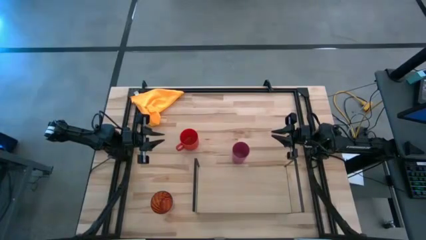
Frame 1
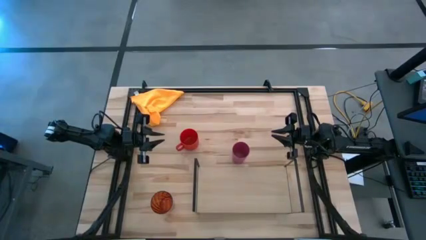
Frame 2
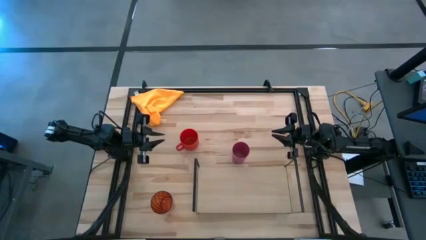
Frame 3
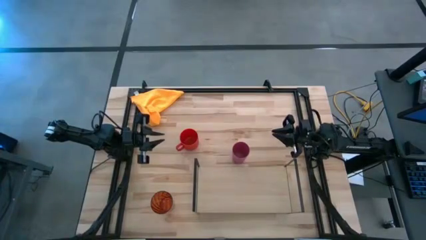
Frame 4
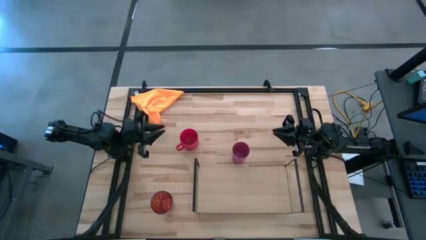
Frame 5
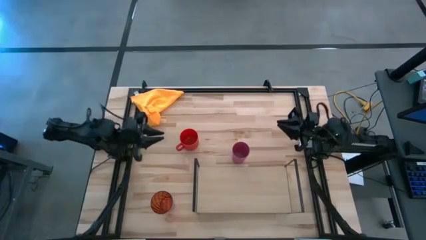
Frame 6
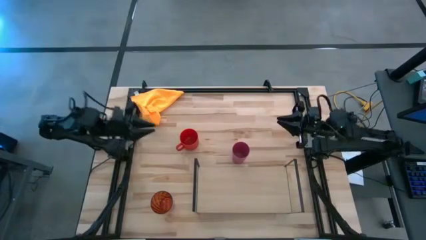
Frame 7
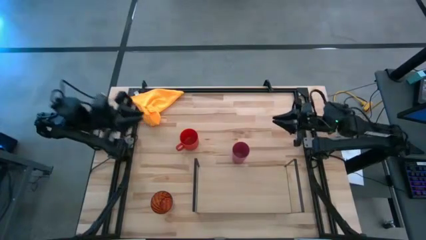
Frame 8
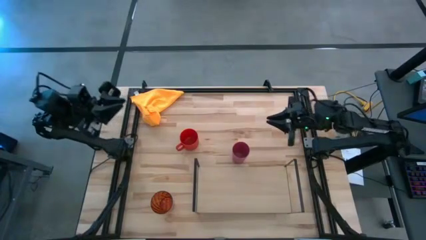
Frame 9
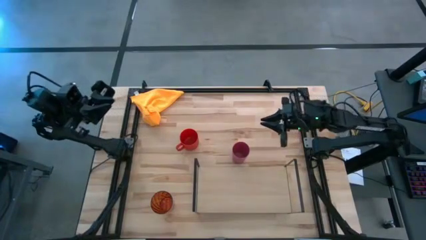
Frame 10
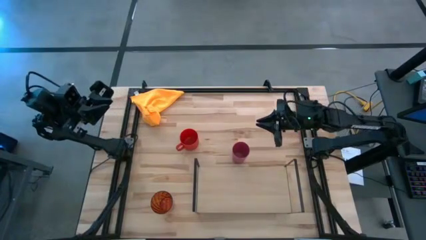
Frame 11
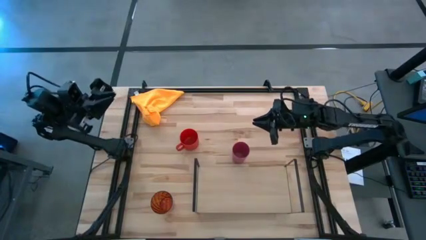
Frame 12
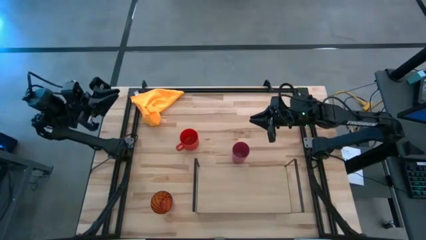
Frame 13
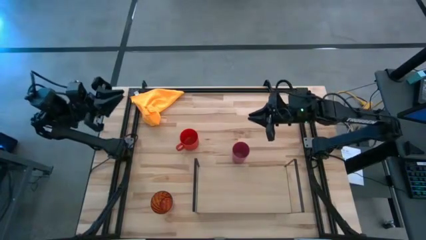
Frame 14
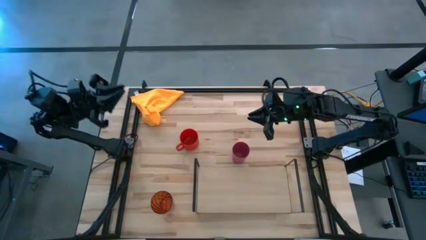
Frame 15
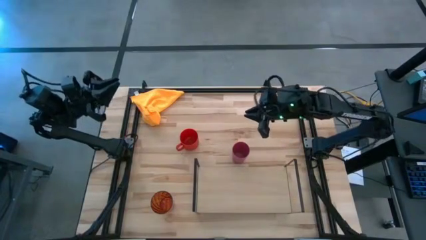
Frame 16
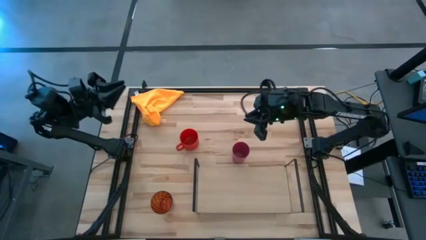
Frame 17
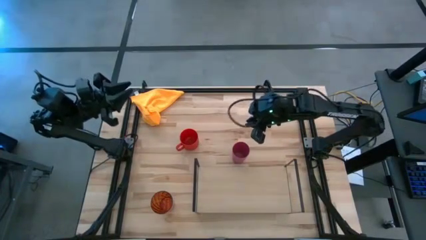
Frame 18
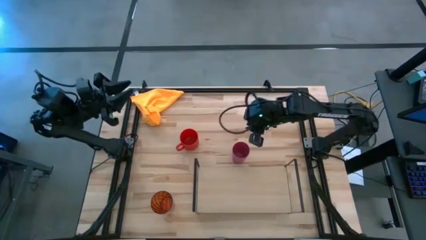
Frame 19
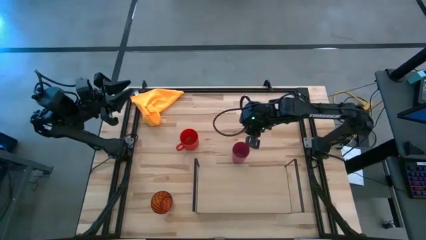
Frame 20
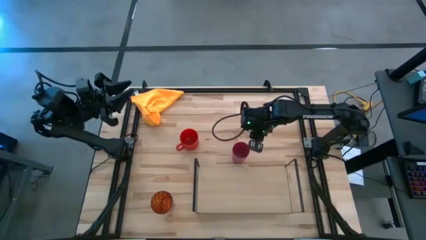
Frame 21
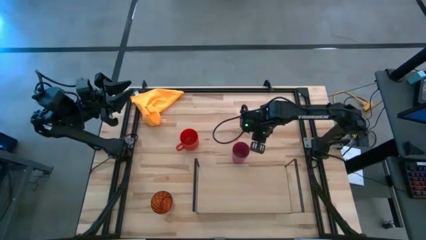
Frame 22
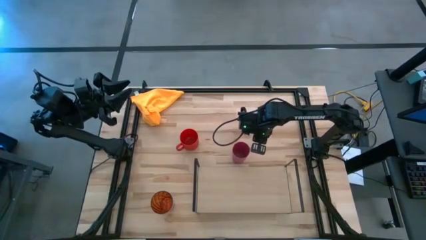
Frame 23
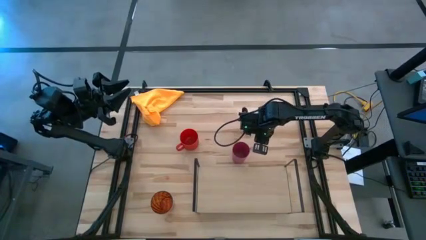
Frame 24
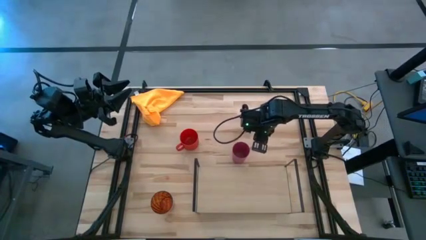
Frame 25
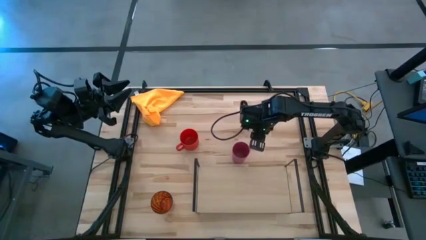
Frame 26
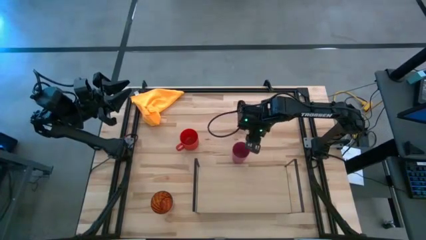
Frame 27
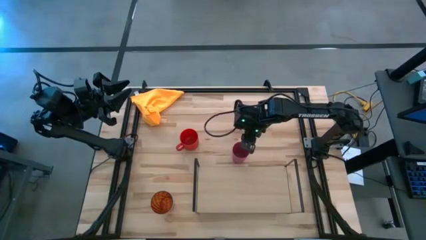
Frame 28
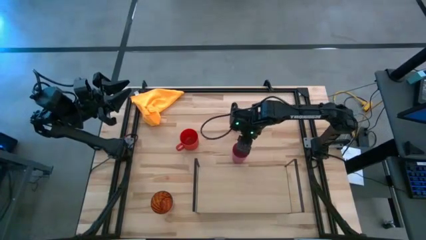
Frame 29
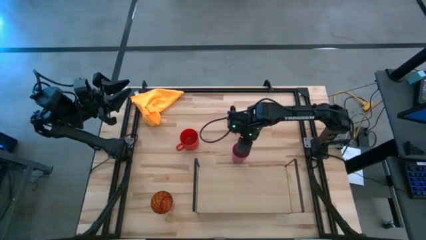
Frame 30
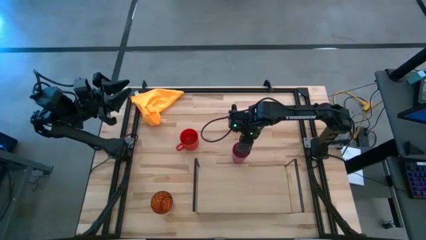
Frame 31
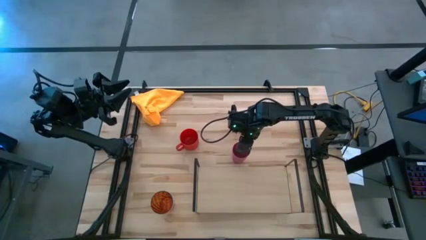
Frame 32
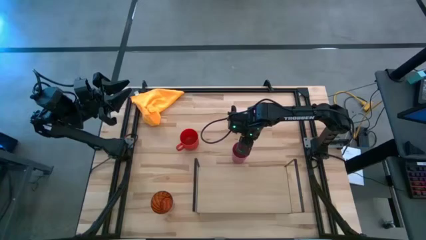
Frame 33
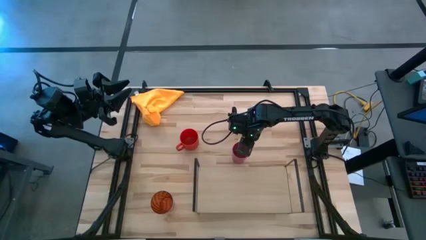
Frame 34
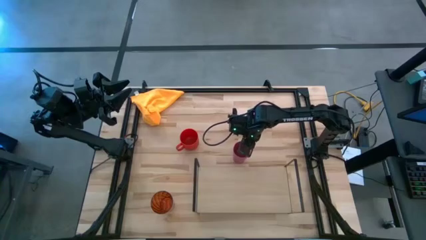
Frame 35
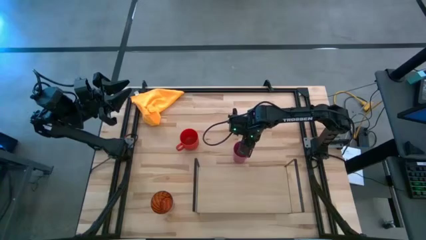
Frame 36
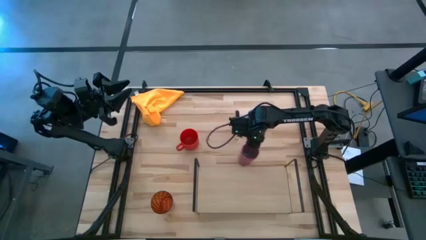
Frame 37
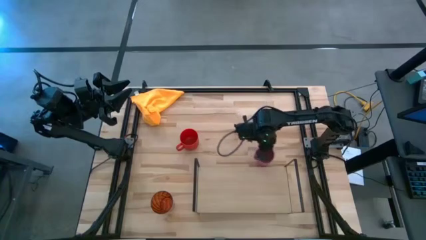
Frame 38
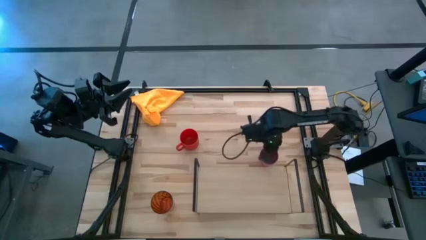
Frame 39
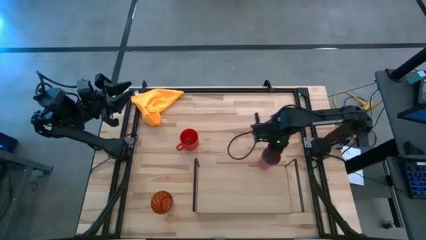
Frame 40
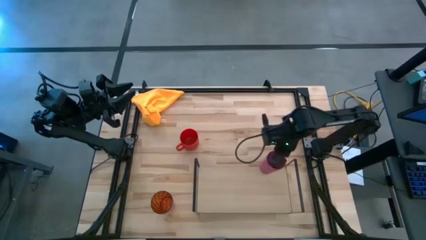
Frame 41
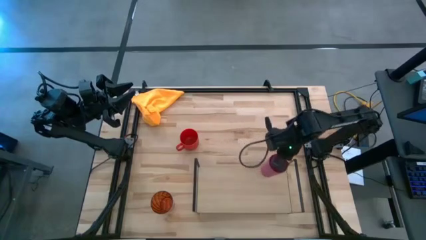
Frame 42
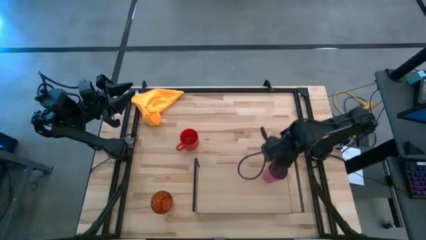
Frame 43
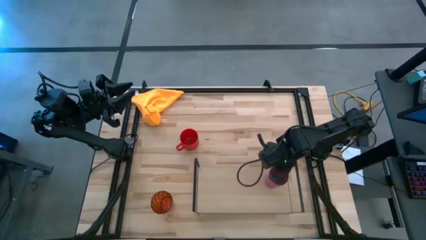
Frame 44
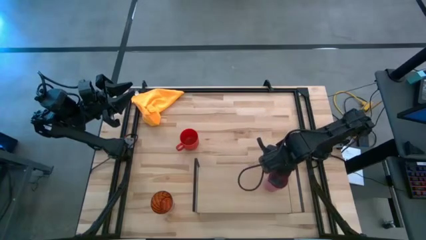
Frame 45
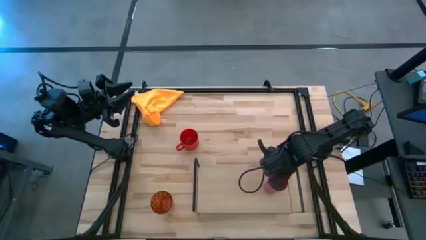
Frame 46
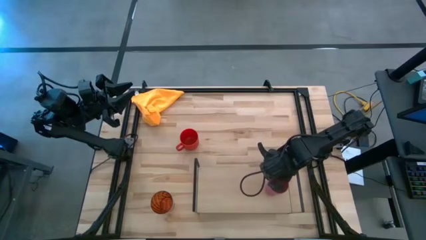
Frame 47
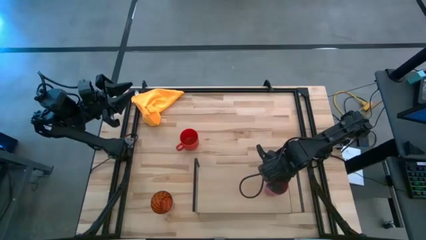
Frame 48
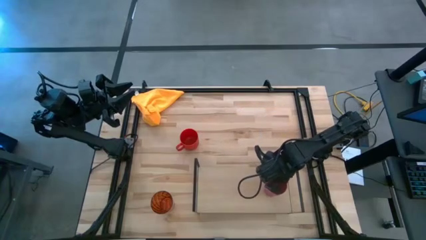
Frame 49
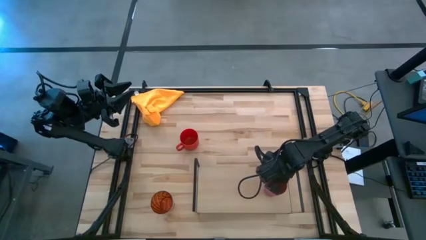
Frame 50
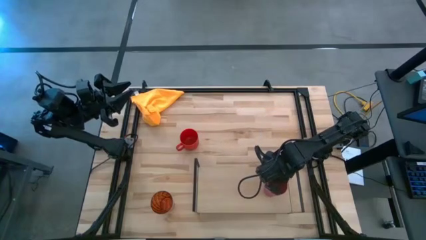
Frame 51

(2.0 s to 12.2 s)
Task: Stack small to large cups/mugs on shelf
Put the pink cup on the shelf
